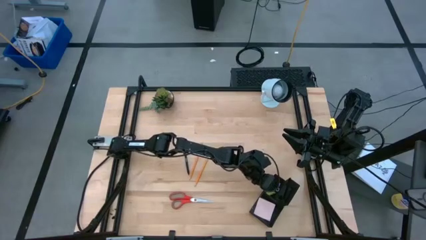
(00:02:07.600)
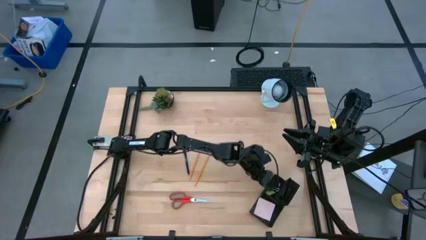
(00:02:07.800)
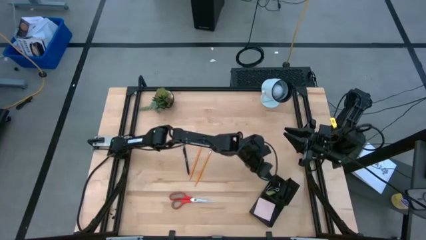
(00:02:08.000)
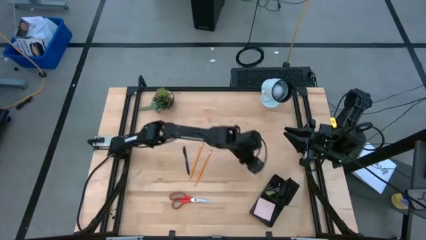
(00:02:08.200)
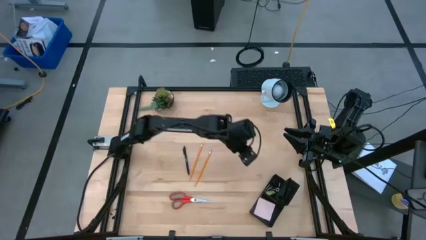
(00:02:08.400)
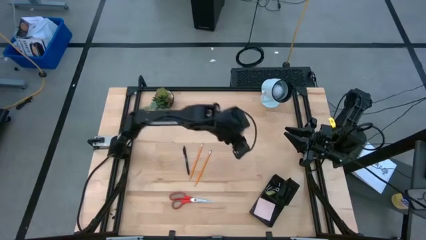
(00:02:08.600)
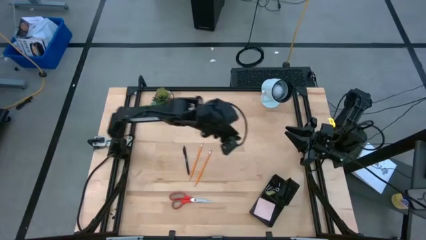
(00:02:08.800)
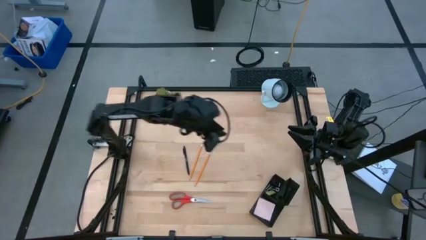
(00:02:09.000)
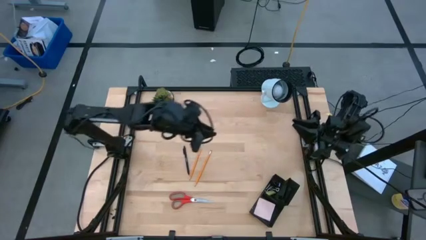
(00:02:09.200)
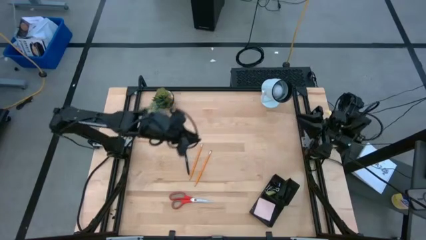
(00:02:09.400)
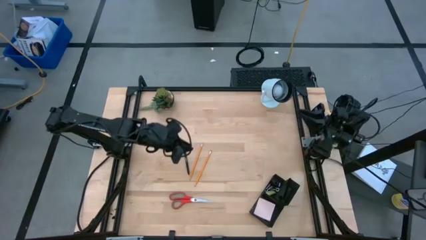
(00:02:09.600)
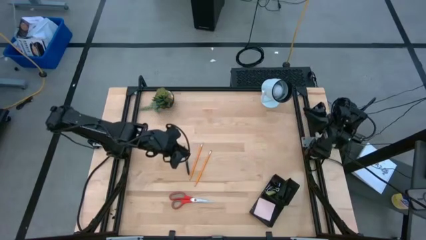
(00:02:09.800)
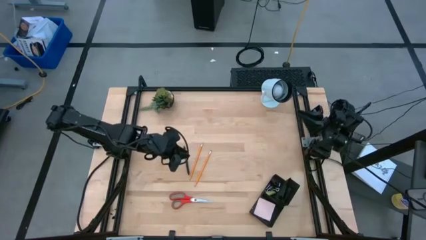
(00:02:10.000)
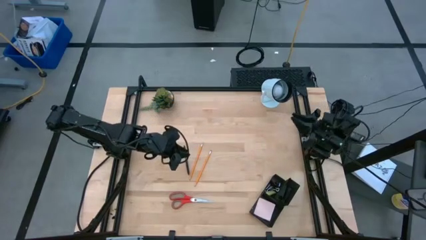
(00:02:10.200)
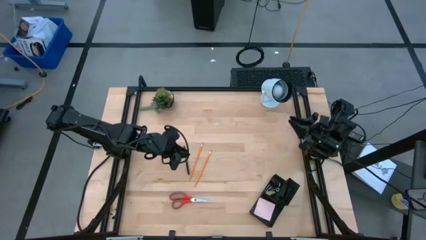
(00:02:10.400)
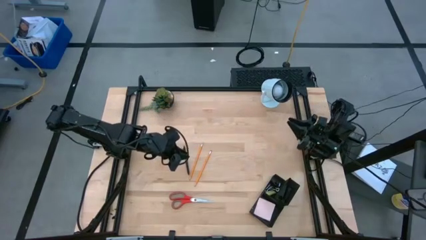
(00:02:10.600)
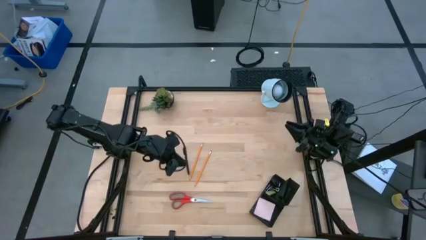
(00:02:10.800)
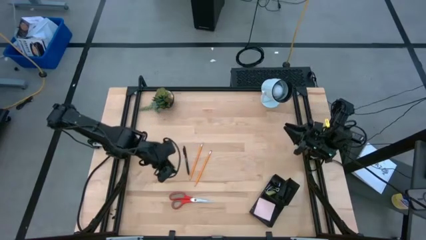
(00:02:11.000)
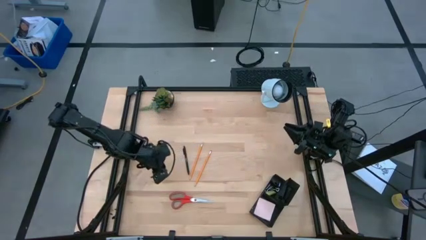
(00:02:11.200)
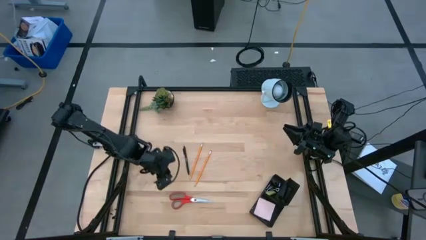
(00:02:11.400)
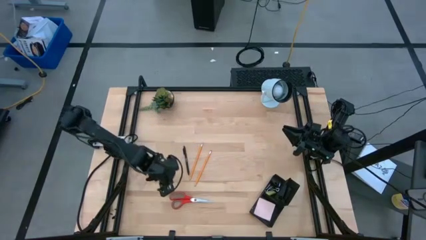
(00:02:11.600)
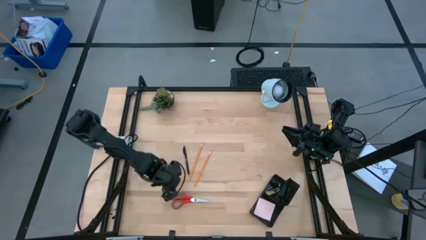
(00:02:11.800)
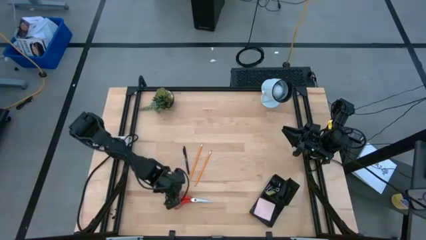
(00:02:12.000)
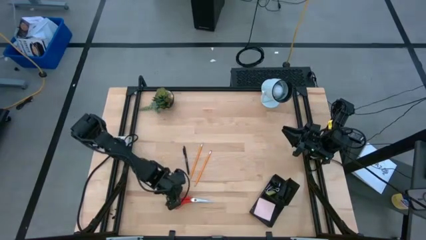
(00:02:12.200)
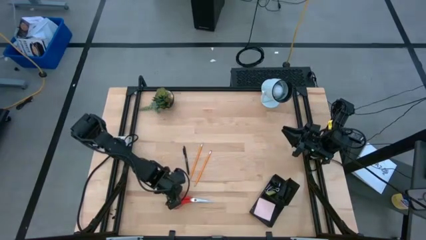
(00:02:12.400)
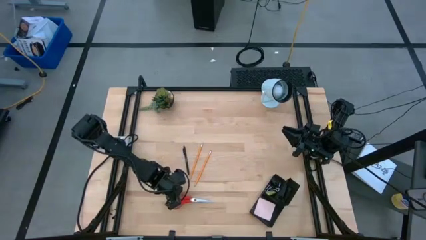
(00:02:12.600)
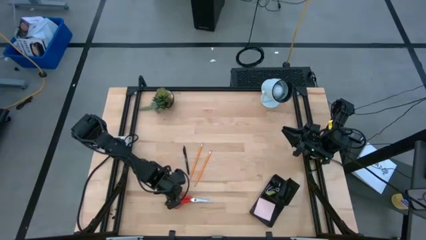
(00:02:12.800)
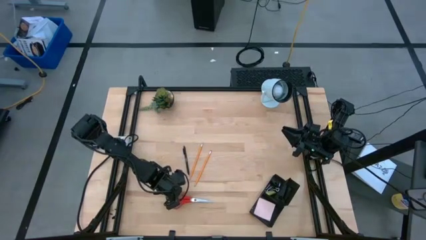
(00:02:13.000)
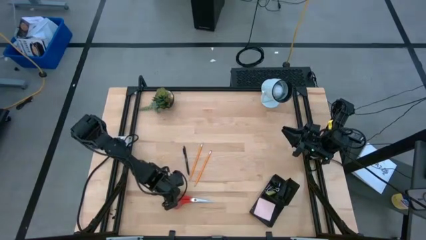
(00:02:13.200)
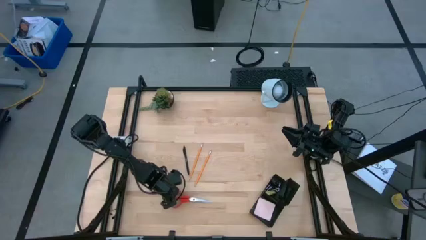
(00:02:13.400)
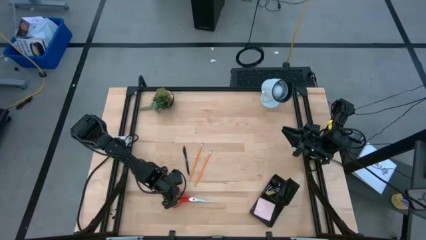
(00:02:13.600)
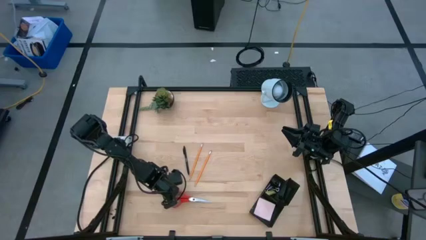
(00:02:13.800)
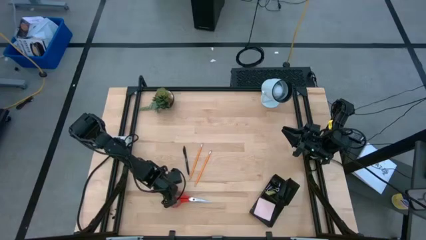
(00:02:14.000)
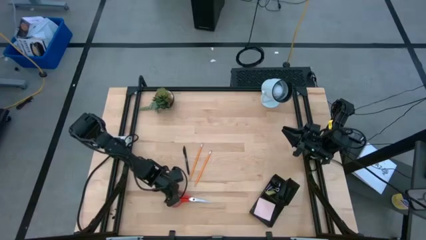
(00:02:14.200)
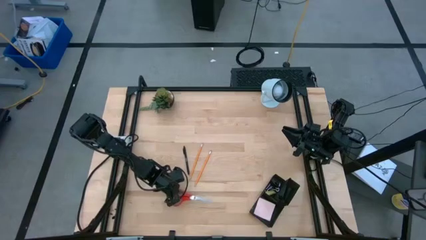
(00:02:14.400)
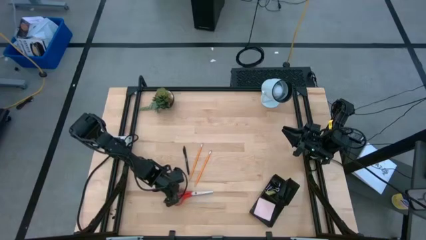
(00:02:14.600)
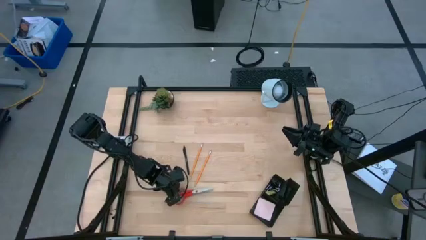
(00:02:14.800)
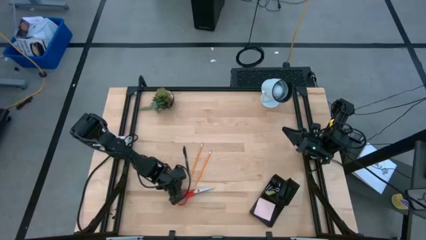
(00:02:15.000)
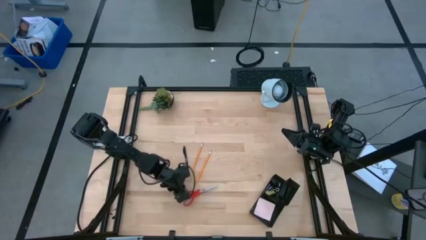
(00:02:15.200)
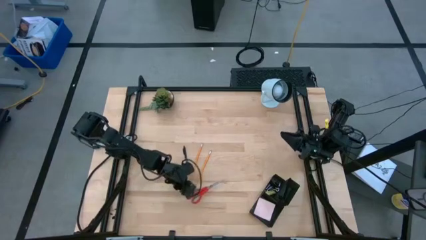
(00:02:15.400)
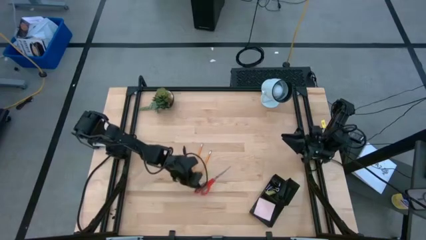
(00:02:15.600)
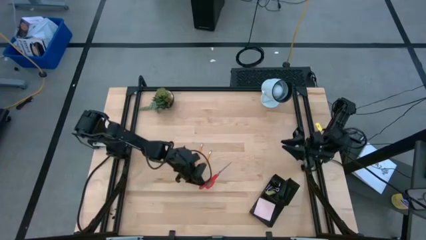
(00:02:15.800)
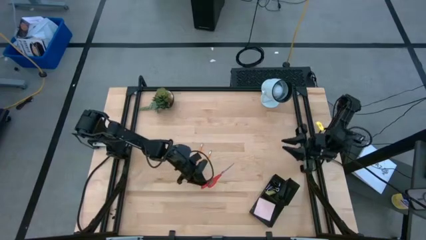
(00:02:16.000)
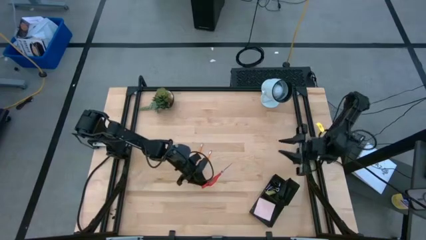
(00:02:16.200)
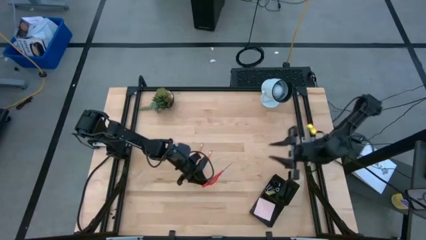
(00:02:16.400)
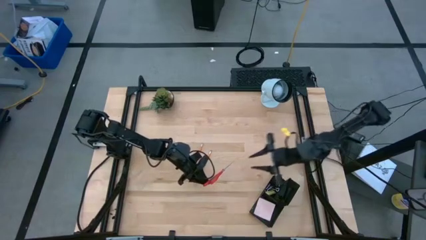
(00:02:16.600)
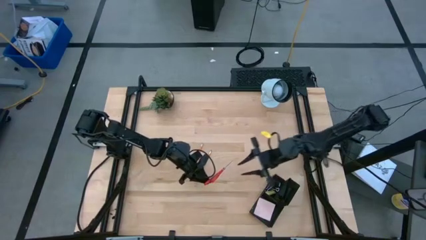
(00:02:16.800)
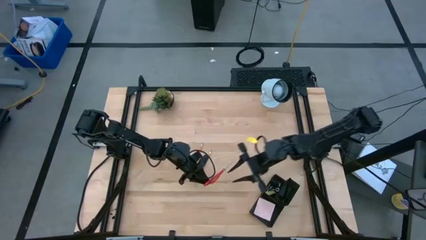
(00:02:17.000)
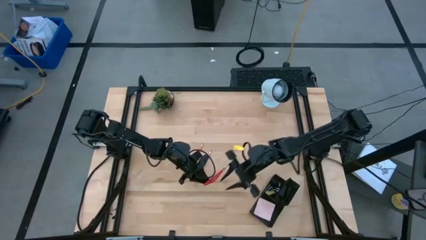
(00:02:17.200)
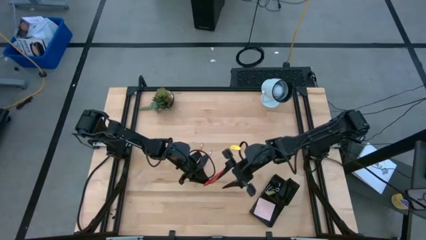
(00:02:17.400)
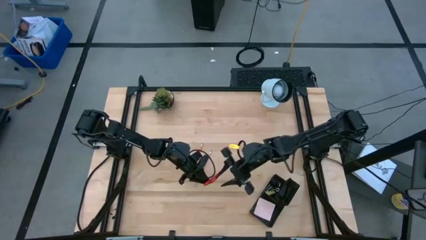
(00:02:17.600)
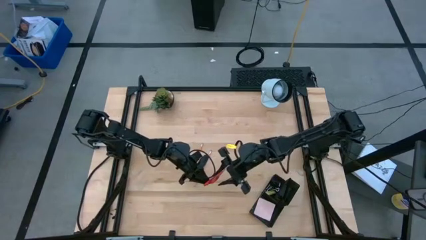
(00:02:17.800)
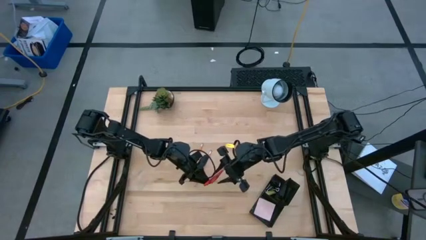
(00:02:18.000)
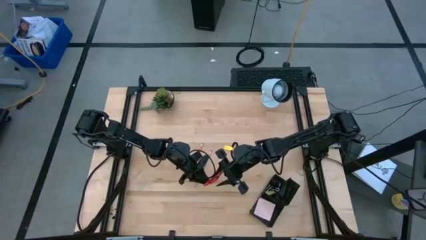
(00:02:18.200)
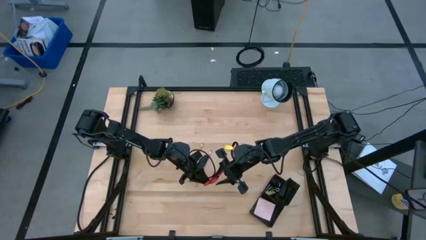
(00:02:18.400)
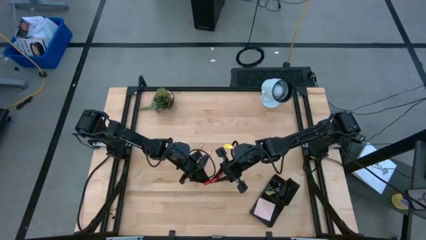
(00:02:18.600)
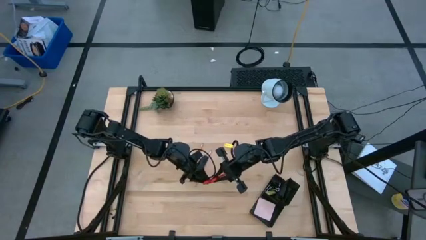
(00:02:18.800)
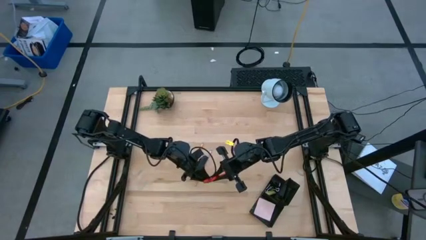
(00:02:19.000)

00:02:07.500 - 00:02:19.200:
Task: Pick and place office supplies into organizer
Put the orange scissors into the desk organizer

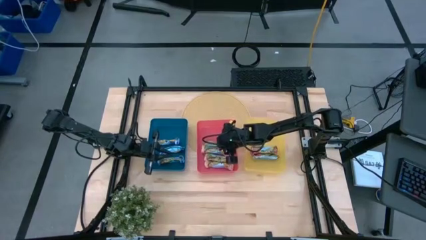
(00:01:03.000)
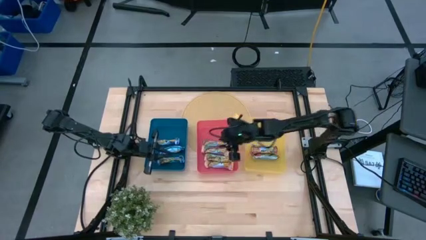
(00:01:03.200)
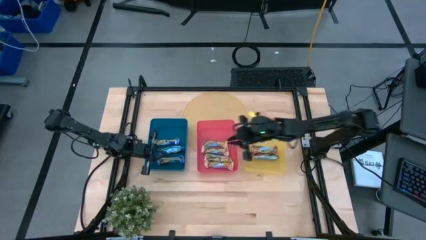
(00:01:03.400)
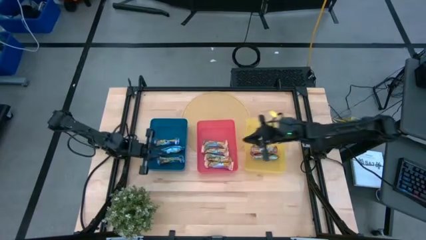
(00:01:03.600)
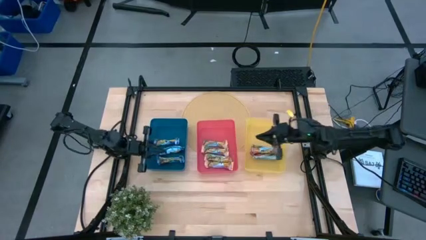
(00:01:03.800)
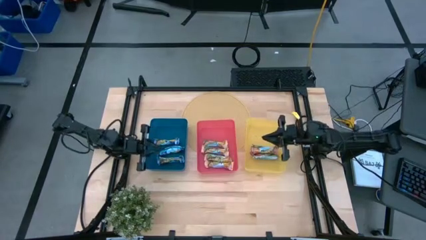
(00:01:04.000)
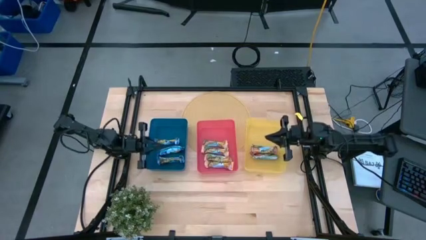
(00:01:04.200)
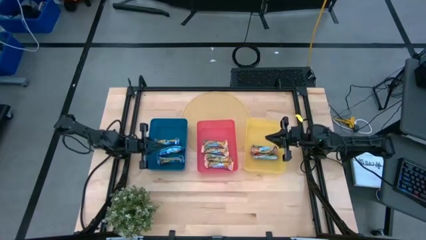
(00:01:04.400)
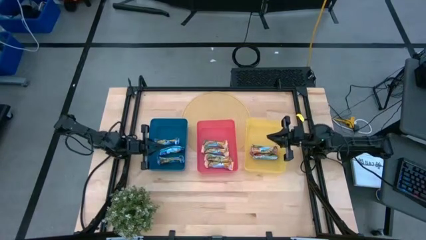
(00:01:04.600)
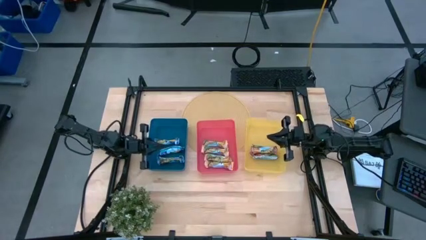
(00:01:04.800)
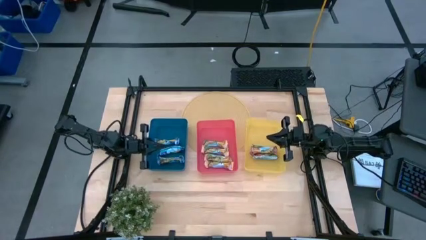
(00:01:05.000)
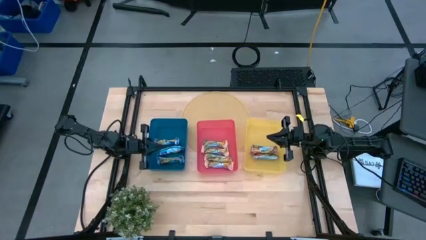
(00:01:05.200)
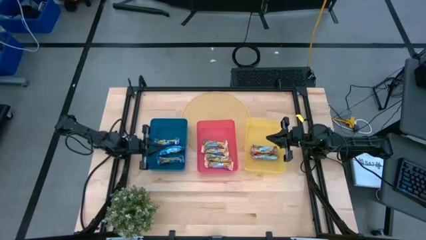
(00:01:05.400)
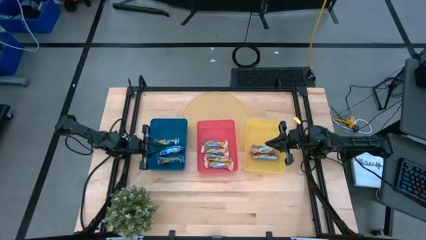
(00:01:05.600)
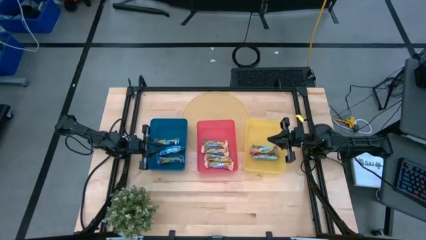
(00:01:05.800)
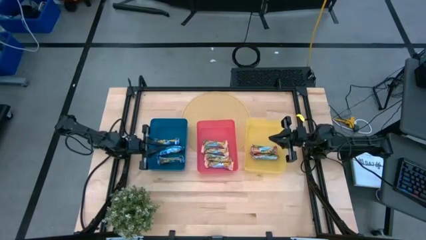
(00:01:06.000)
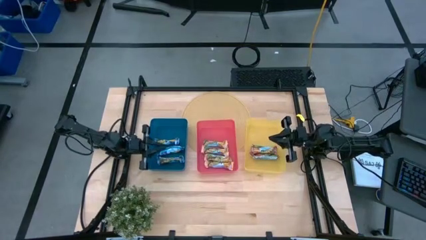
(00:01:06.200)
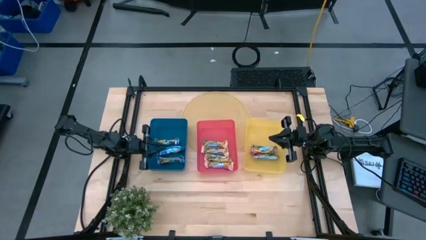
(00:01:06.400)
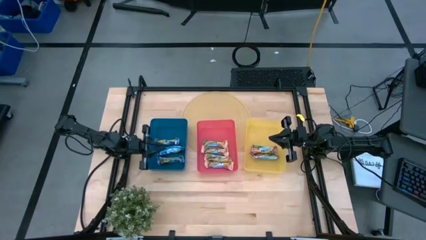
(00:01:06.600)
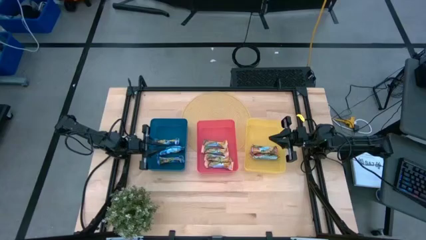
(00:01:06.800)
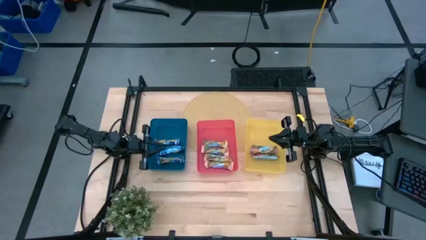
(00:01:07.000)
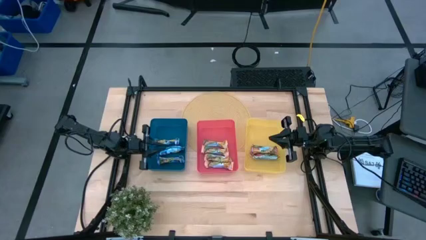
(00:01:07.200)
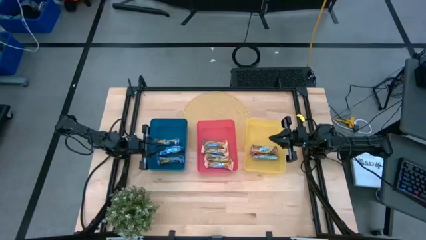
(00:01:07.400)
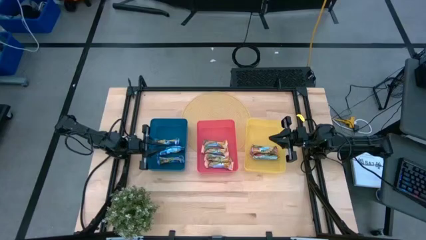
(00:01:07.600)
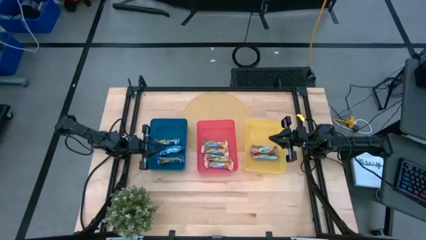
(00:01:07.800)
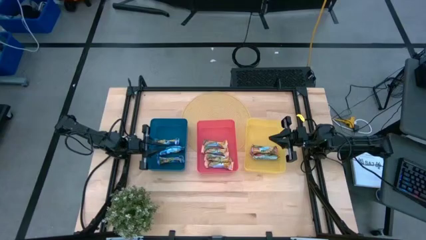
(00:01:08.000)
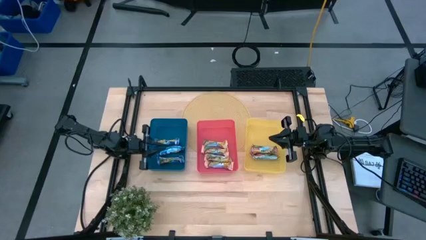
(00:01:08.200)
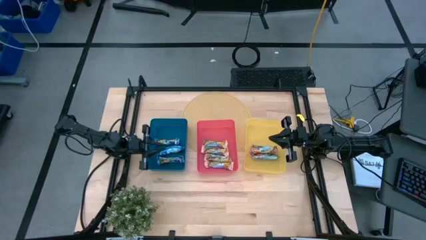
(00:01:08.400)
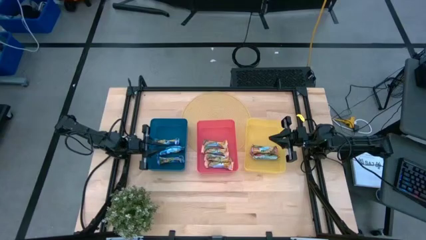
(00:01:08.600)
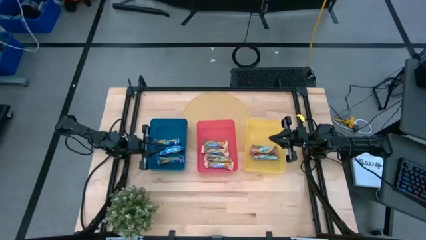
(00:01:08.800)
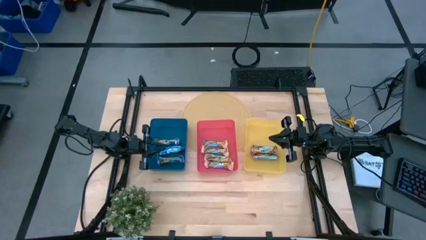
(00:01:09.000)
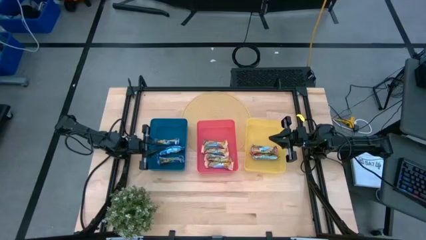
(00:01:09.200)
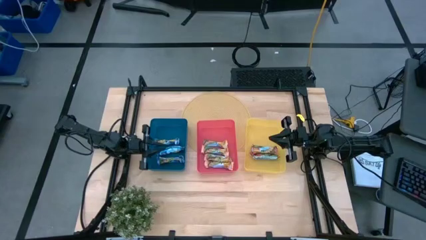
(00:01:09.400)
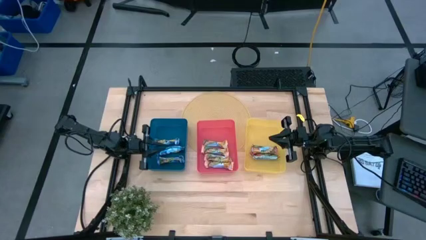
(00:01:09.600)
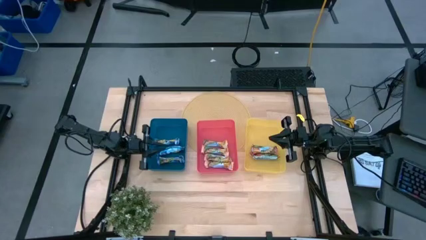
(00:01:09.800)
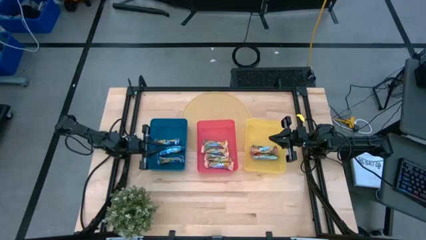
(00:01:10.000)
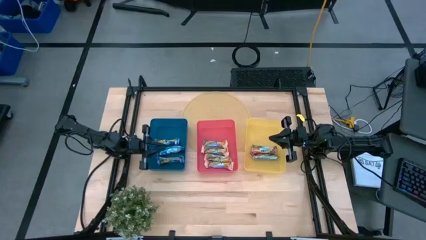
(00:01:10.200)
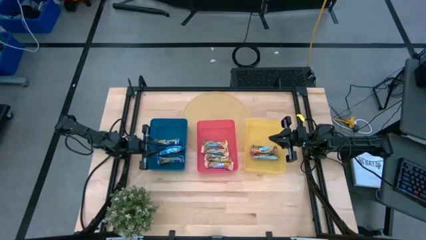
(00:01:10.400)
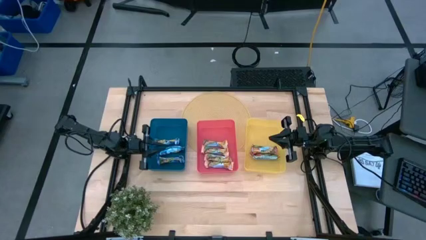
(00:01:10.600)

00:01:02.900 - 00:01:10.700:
Task: Pick and place Granola Bars by type
Return to Home Position
